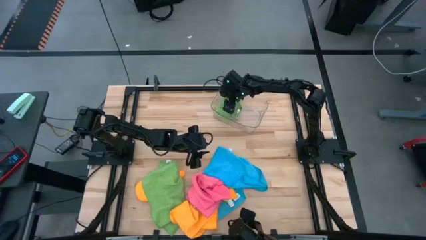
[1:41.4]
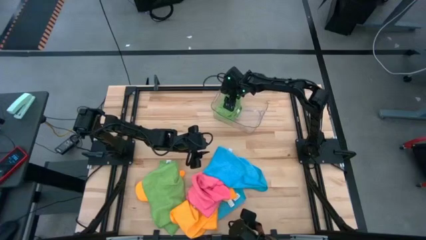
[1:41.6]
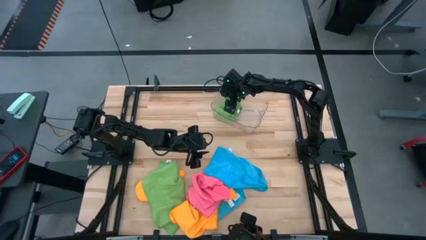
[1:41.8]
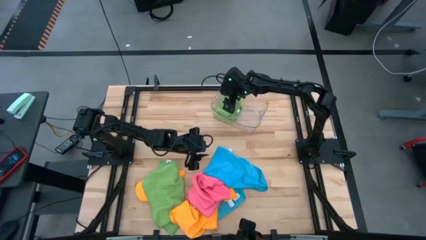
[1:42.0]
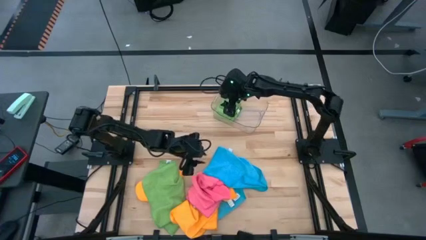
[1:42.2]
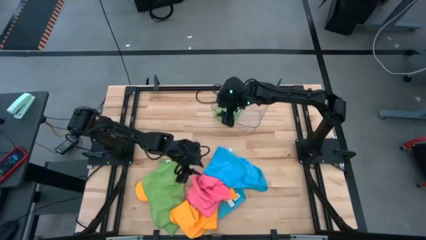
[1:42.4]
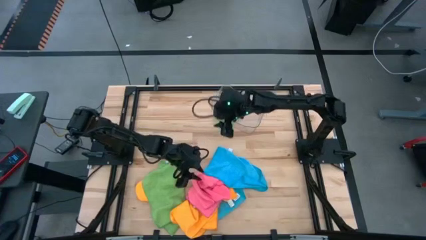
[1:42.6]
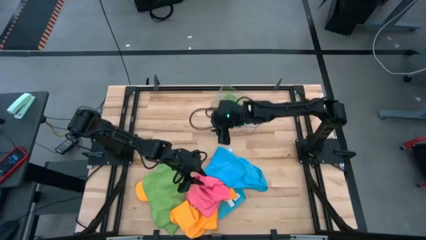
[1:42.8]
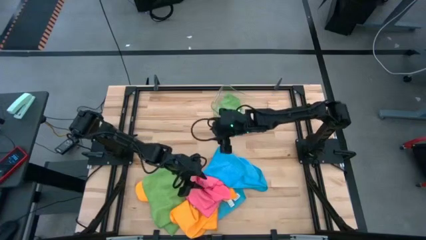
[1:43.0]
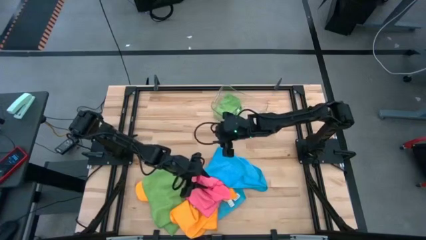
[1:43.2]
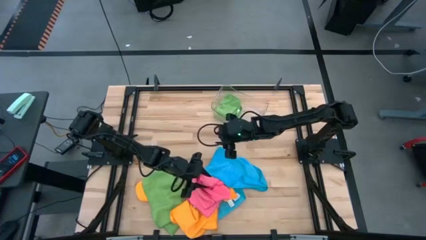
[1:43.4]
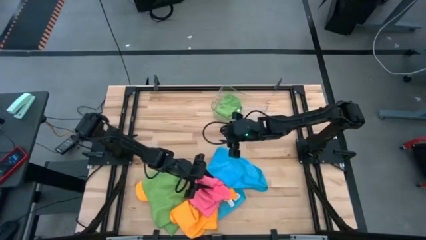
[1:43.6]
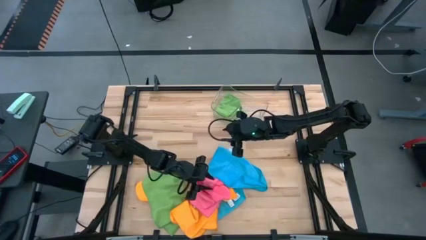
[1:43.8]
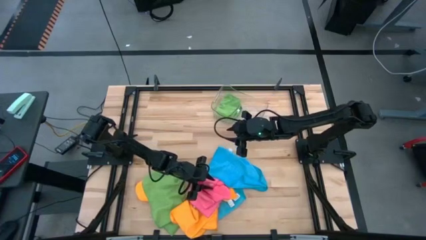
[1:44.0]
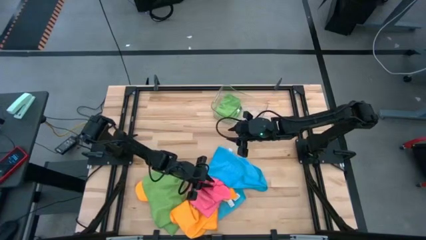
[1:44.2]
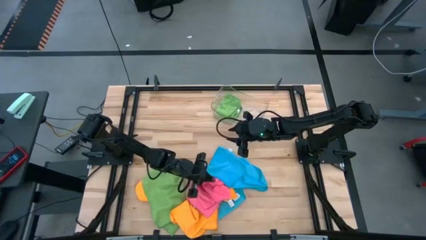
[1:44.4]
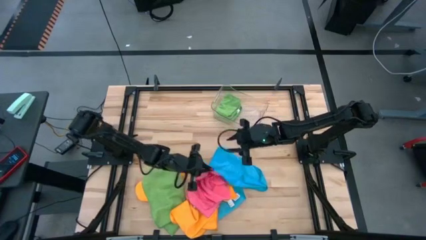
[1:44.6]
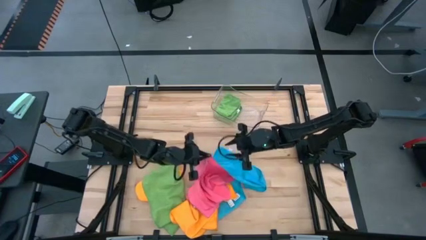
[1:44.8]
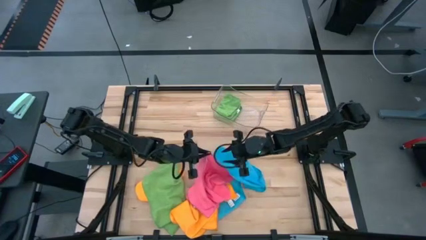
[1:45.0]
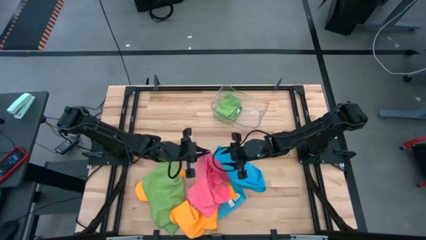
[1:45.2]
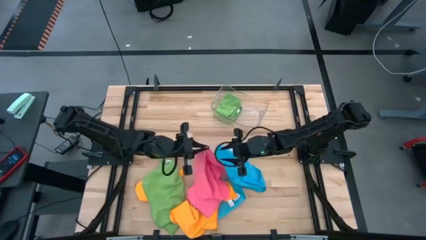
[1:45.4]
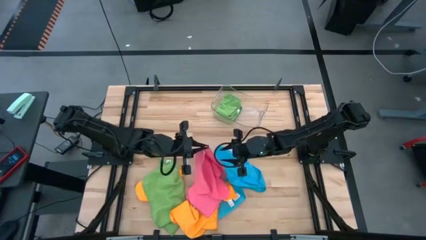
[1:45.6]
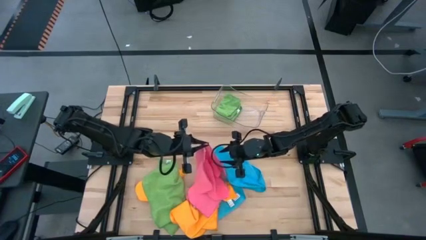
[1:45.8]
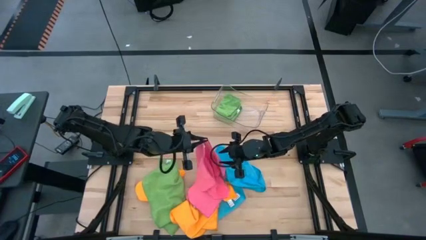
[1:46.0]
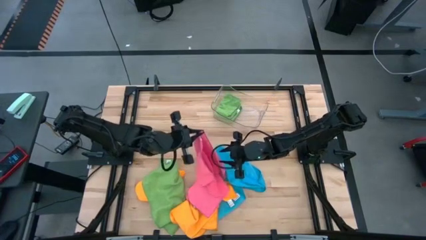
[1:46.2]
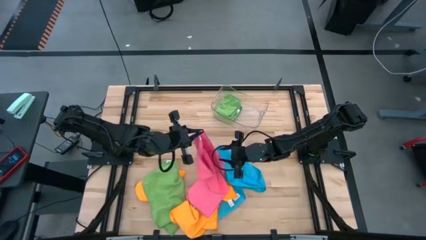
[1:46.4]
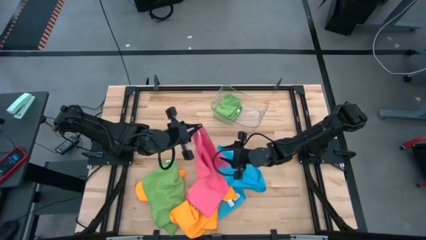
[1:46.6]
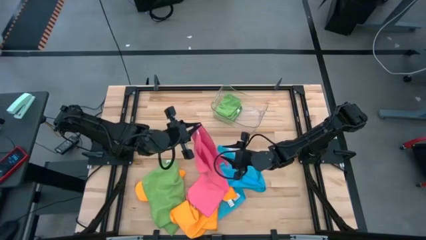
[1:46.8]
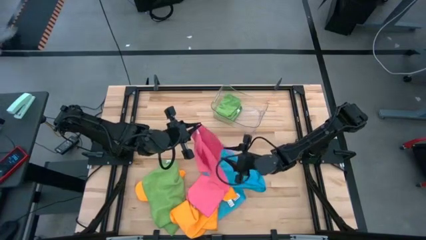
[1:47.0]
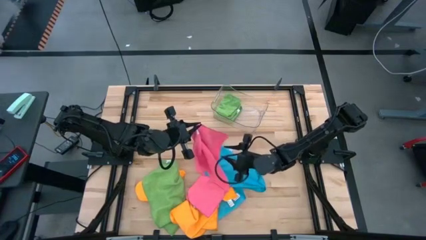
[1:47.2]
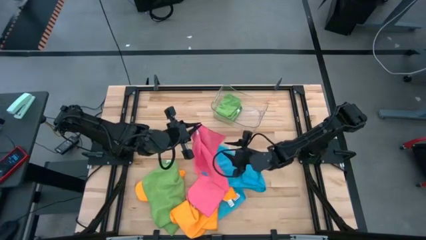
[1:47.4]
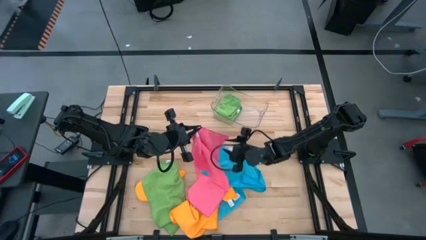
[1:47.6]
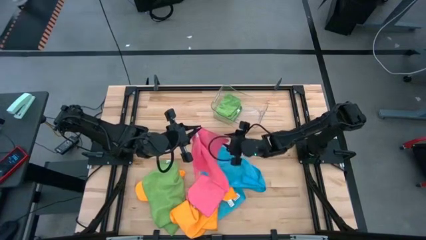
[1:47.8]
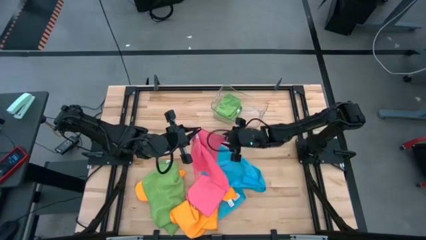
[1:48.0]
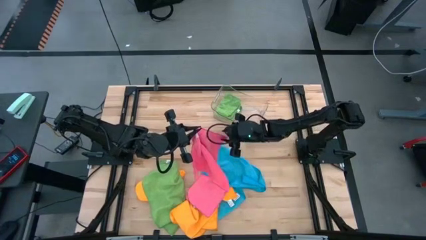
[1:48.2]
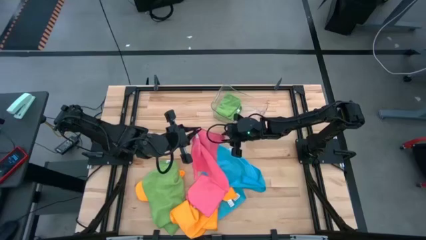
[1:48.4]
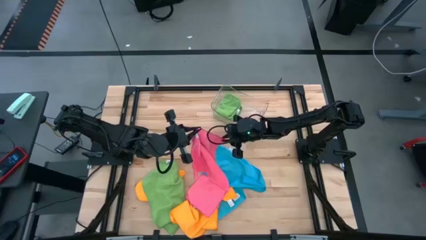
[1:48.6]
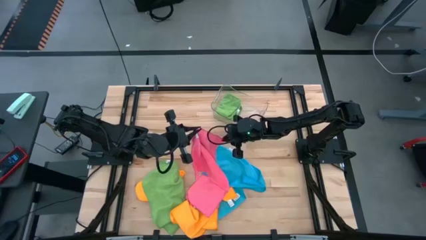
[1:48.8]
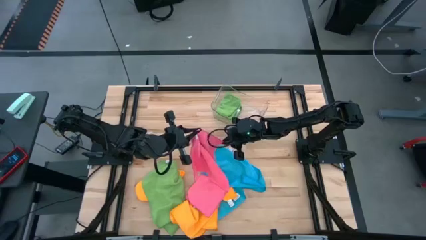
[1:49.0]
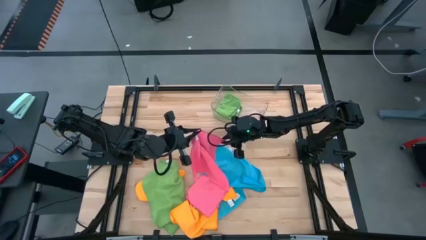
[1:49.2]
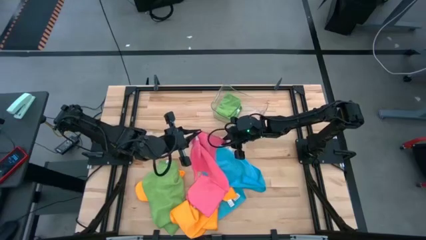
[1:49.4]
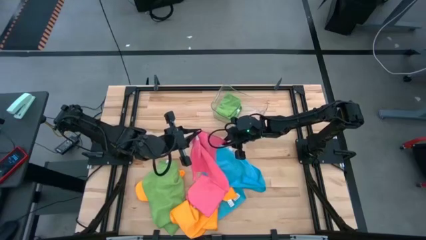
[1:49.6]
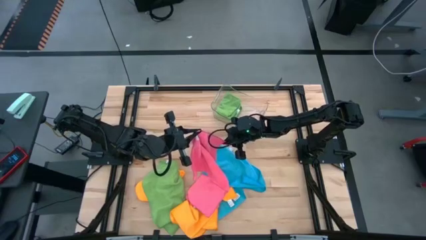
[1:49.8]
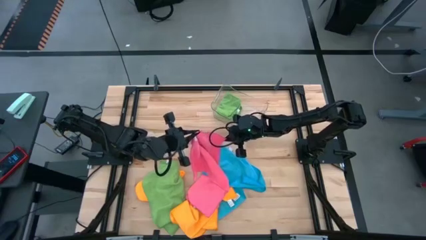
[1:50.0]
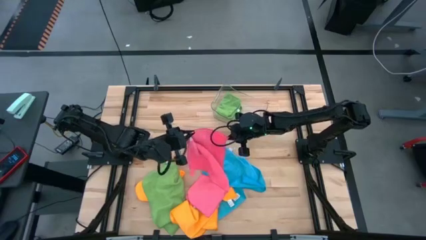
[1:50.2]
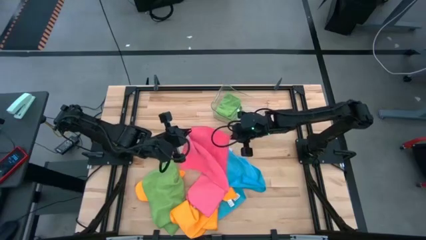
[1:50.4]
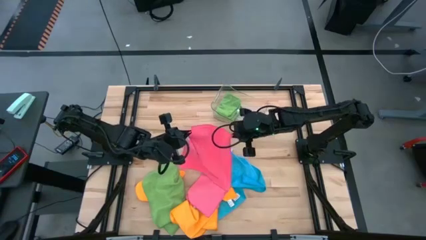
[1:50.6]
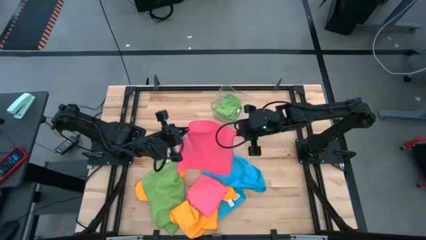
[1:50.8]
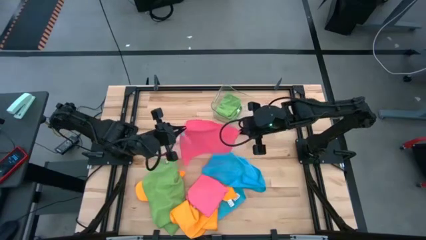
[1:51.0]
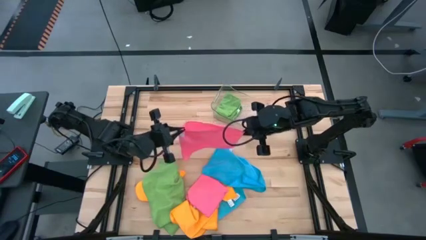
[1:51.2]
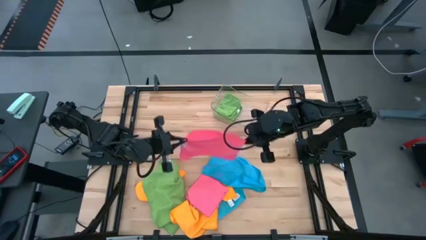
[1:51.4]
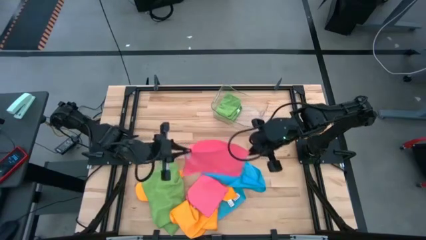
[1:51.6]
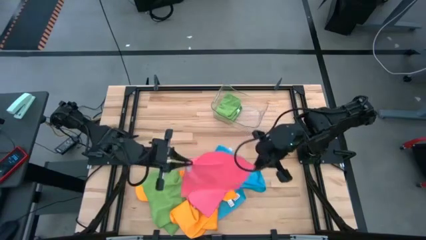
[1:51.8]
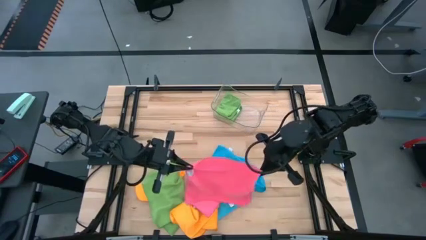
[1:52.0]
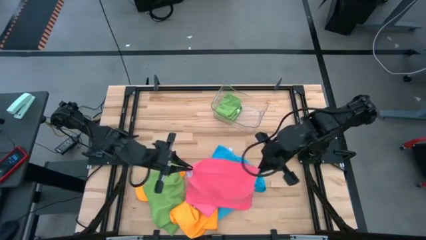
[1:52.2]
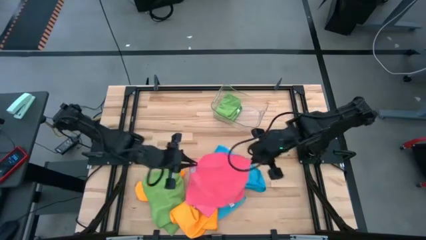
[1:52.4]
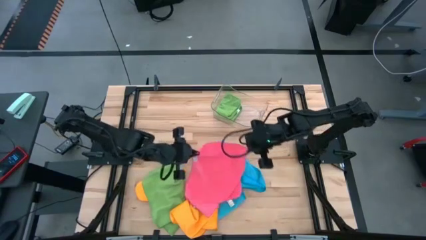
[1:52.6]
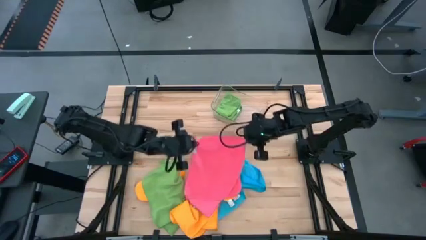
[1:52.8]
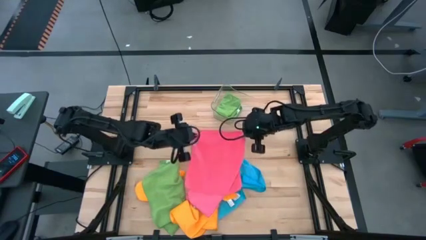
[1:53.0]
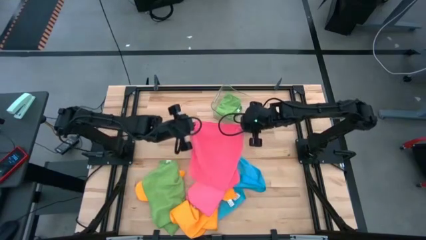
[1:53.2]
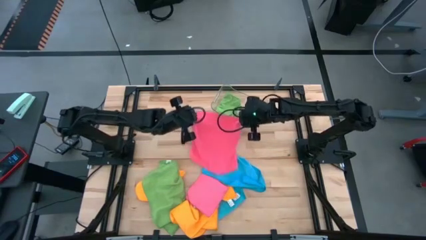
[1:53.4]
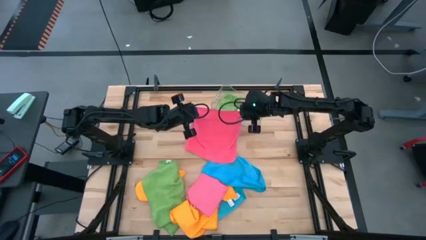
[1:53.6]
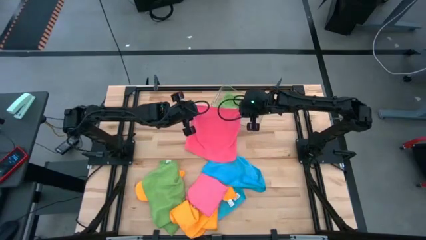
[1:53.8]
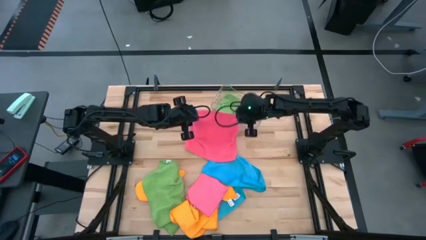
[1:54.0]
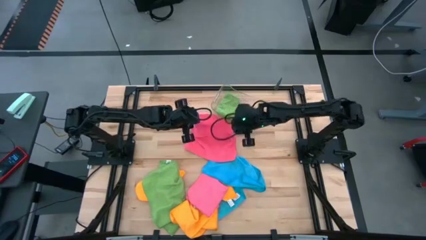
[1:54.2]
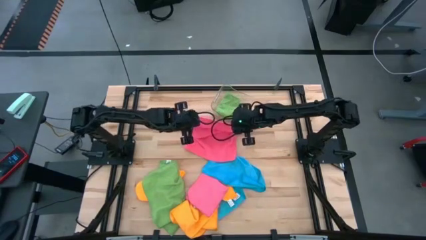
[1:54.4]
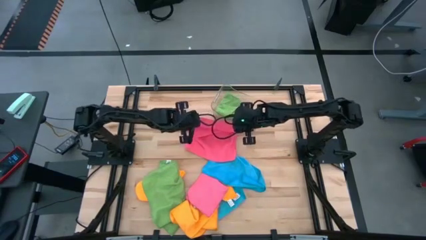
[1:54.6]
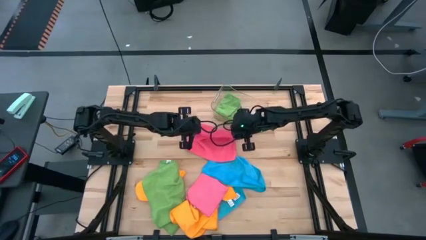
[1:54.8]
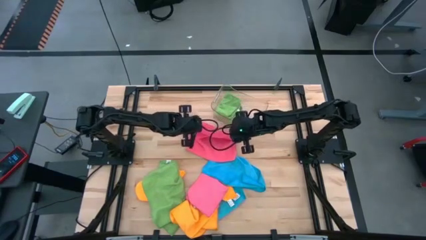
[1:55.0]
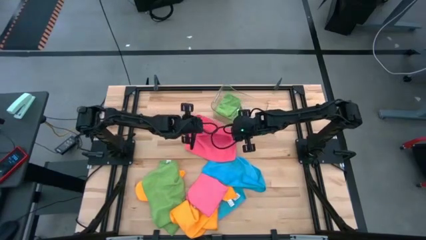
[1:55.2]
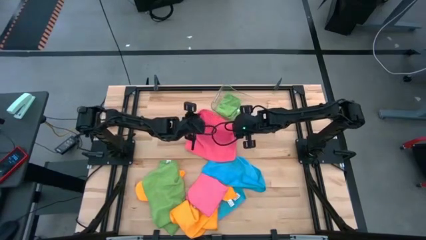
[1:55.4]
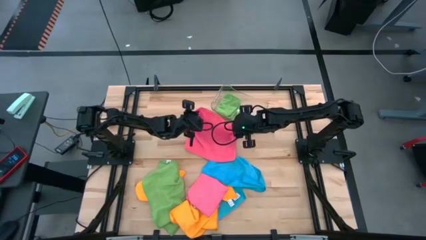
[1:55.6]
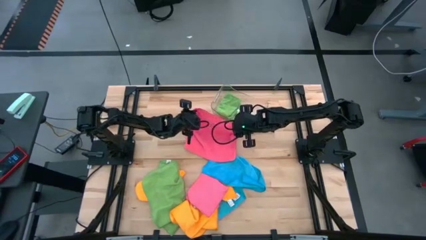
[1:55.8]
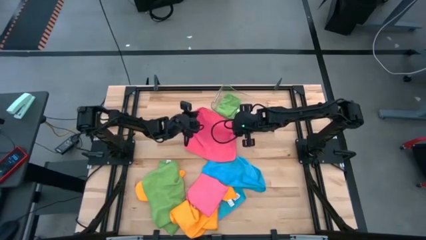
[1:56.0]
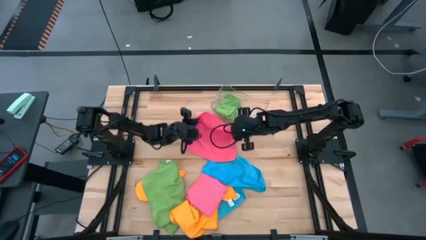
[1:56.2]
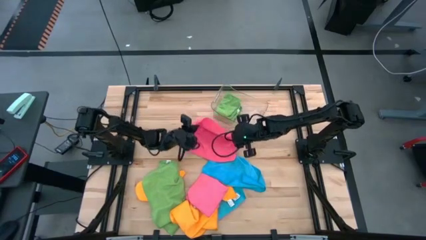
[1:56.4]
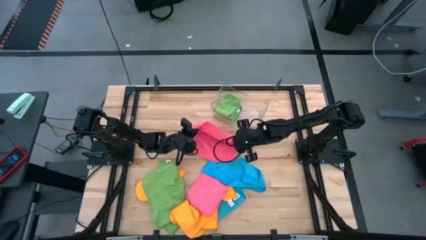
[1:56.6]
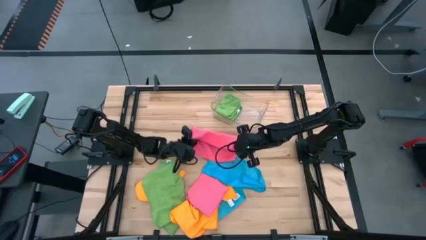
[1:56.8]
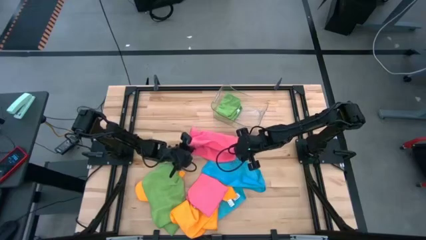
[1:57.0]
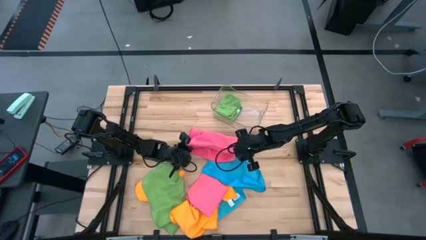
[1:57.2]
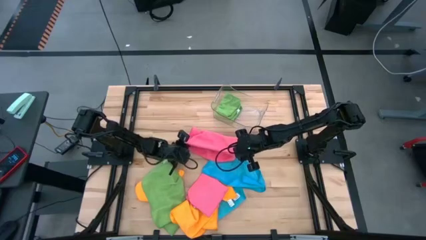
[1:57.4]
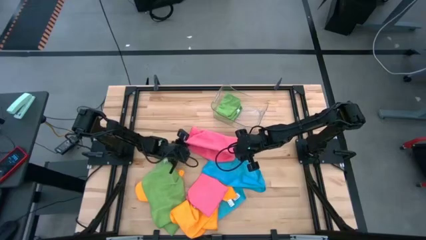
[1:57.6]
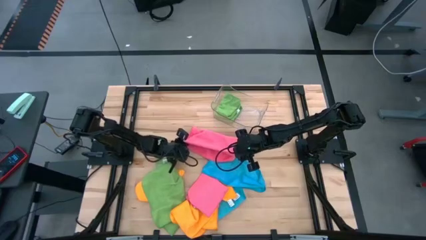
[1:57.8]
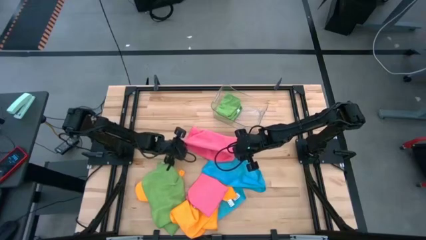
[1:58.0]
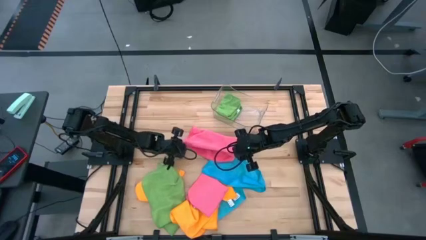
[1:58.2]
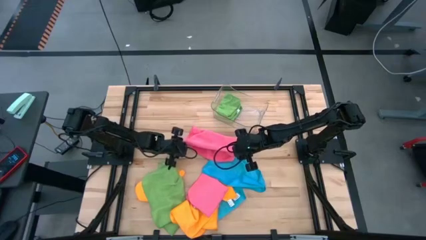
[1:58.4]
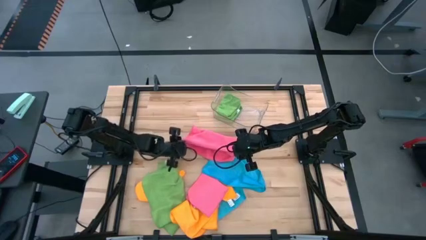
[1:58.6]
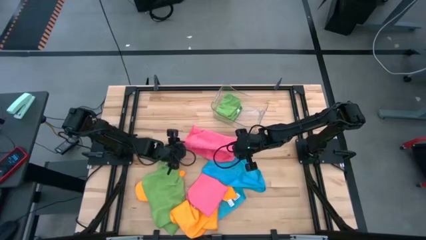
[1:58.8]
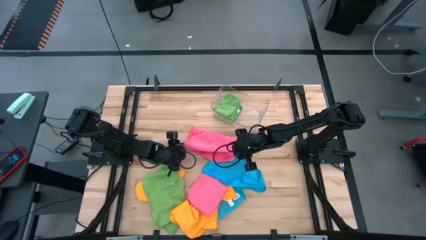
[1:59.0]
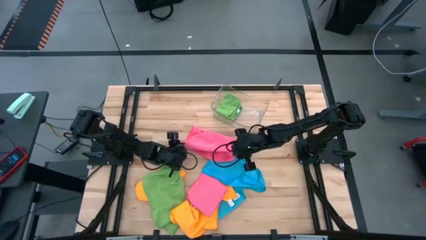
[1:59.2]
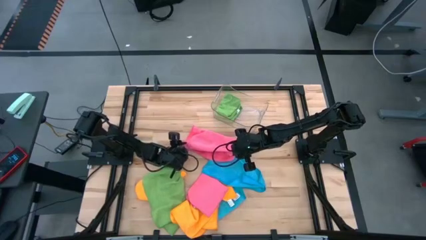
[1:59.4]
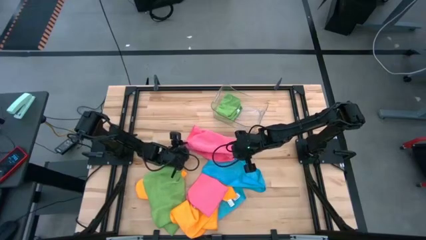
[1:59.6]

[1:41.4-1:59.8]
Task: Fold microfiber towels
Fold the top pink towel
